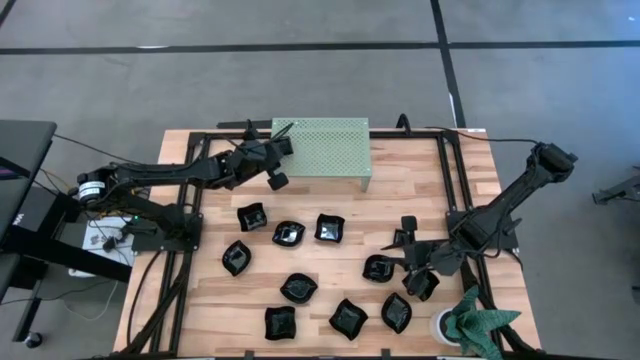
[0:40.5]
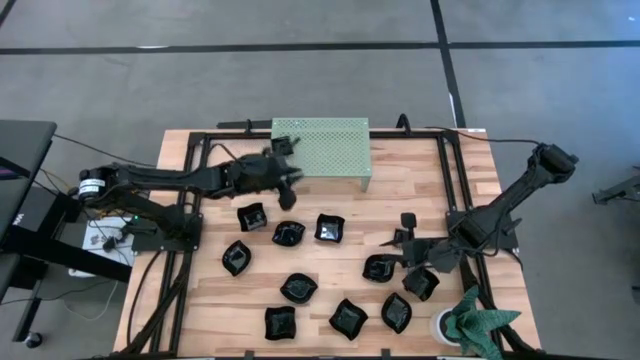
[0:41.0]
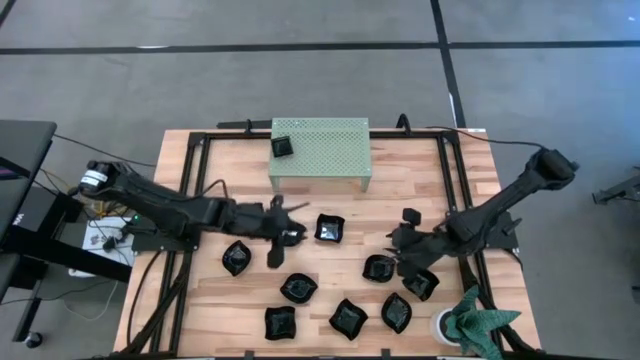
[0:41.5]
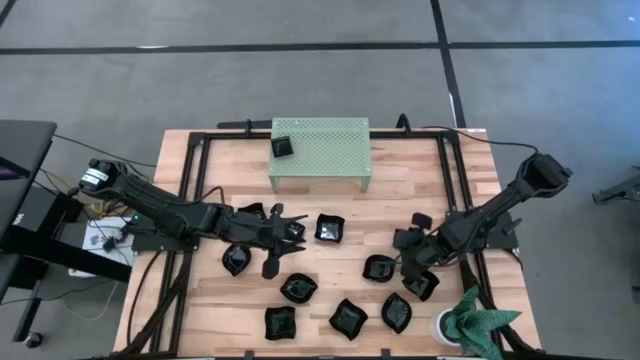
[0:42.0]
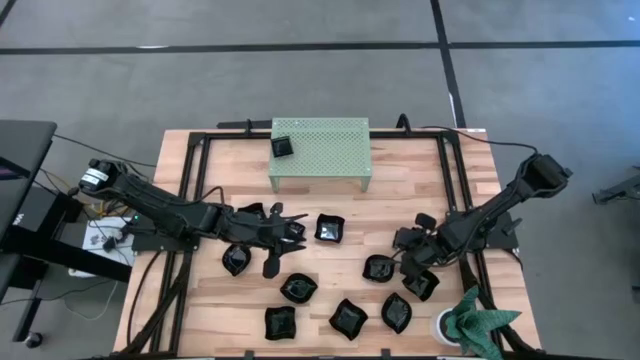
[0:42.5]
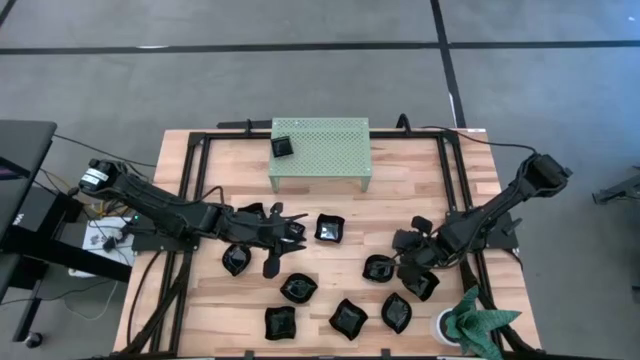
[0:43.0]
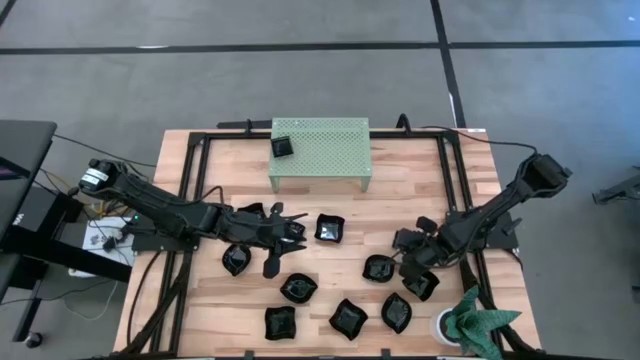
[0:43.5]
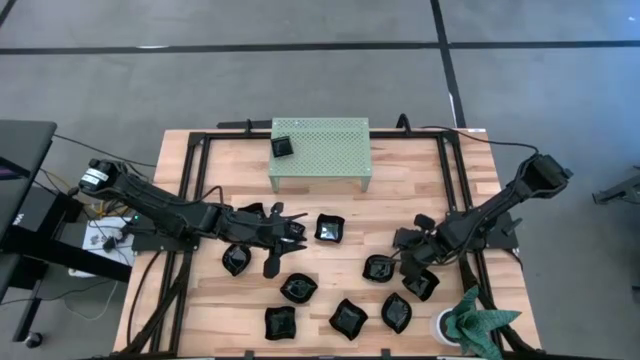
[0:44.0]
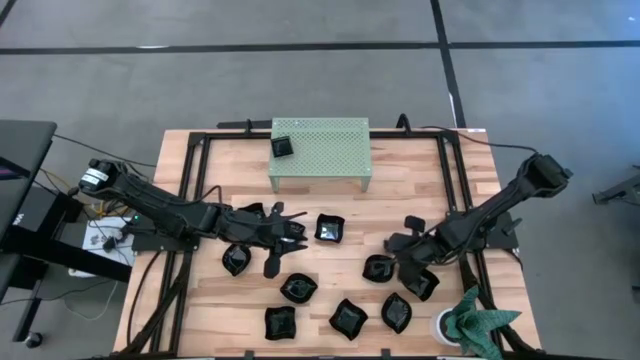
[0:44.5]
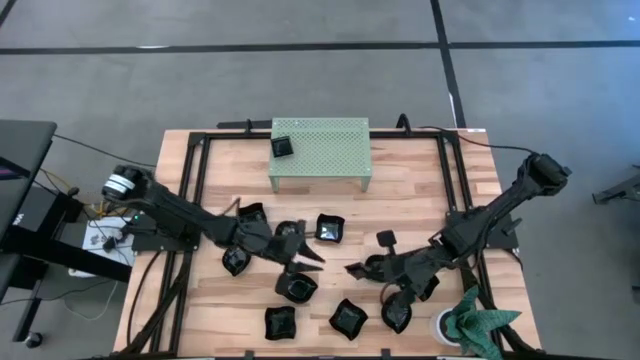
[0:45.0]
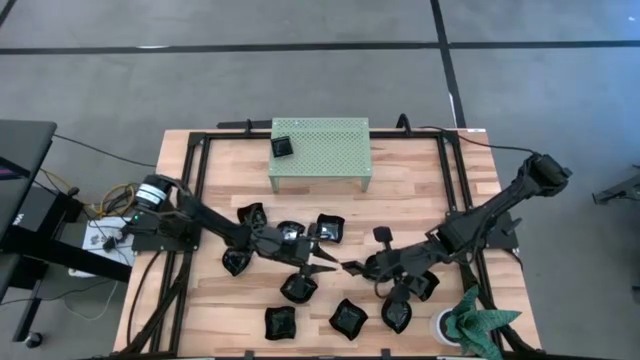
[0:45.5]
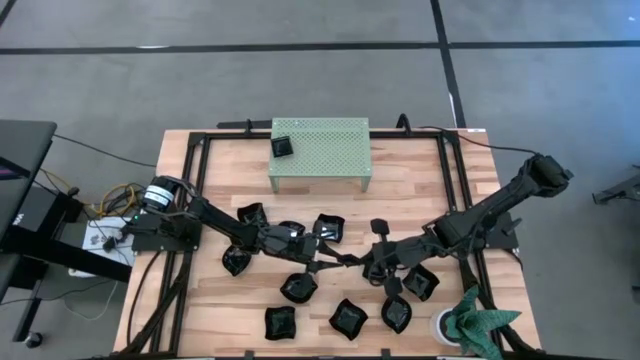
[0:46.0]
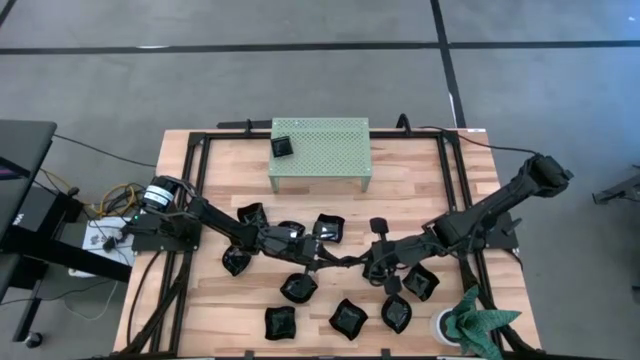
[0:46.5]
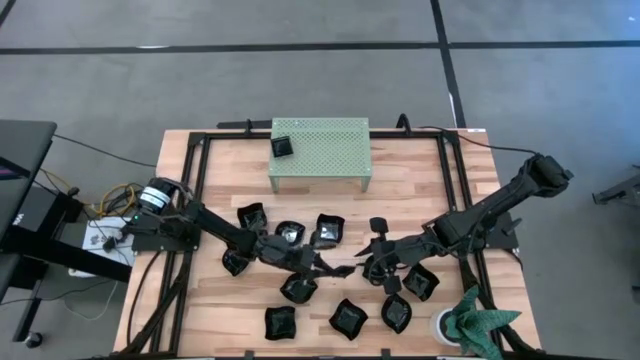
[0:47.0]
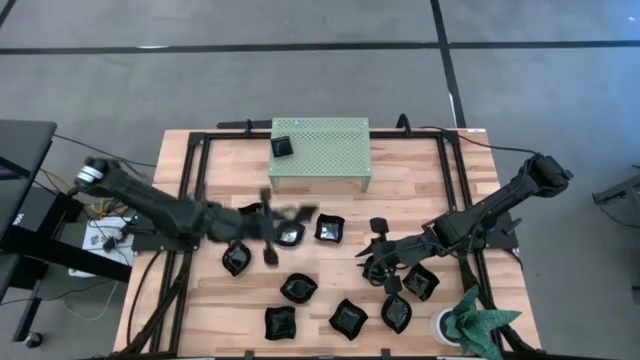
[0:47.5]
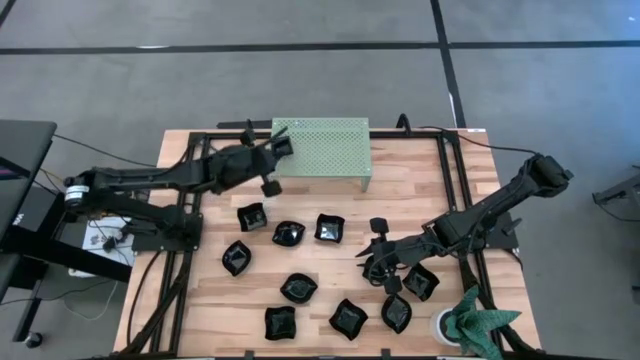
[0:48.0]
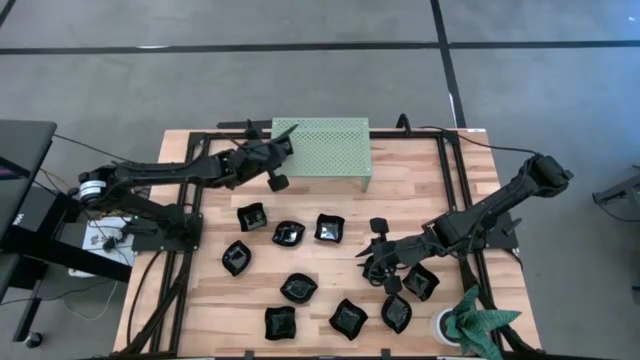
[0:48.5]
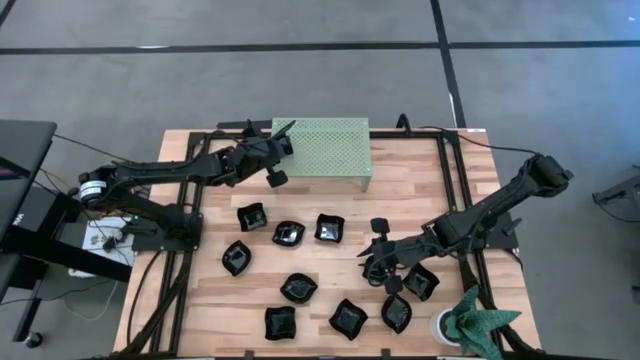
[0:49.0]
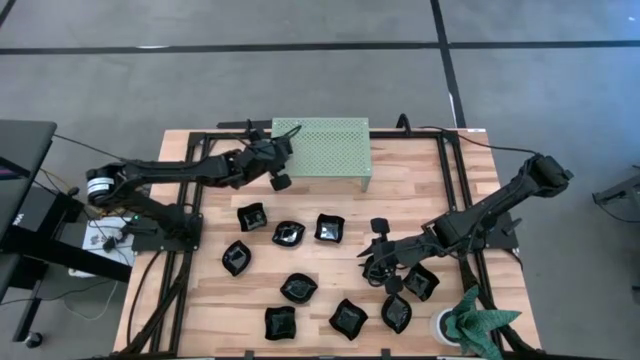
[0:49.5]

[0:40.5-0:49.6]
Task: Pick & Place Mini shaped plates
Stack the black square plate on top of the black square plate on the shelf

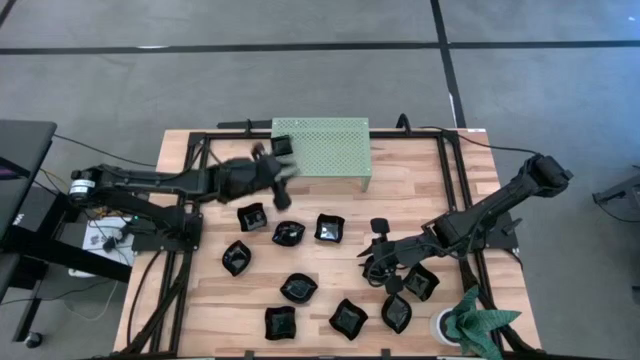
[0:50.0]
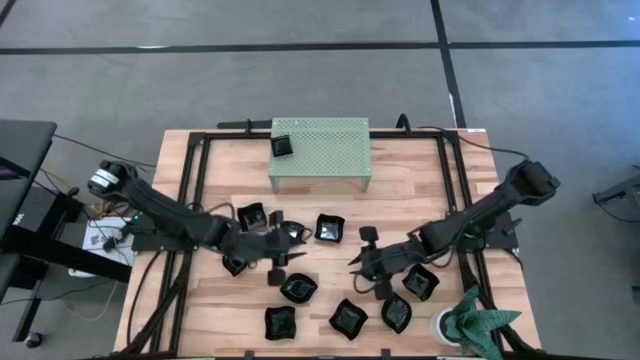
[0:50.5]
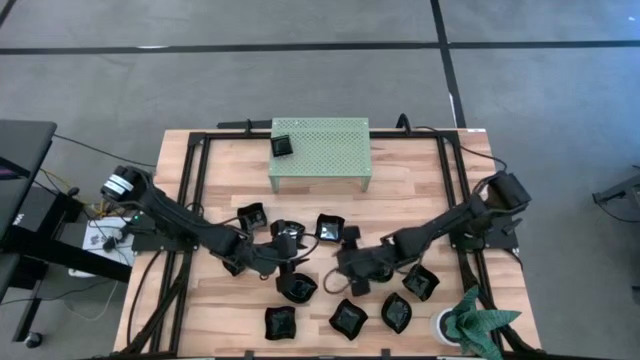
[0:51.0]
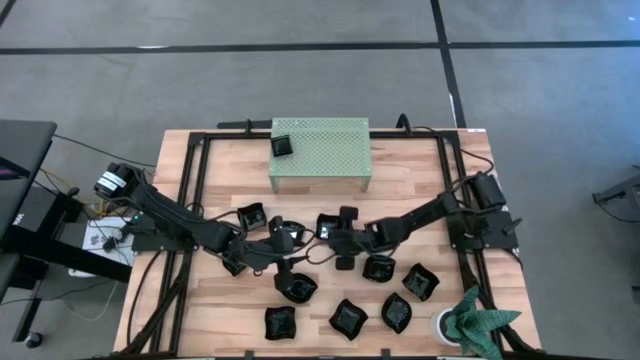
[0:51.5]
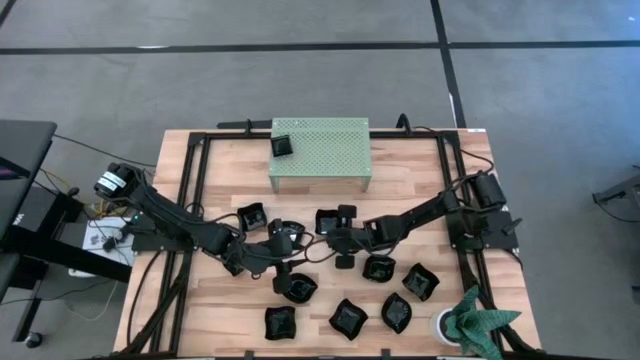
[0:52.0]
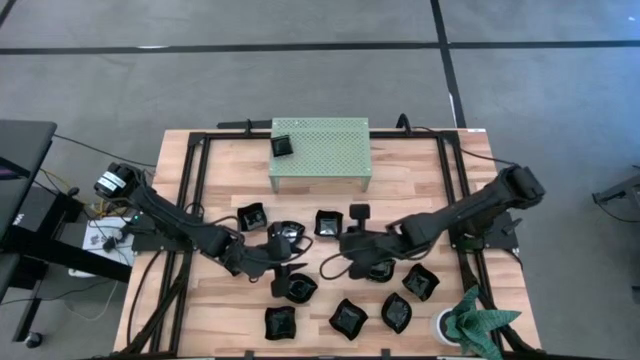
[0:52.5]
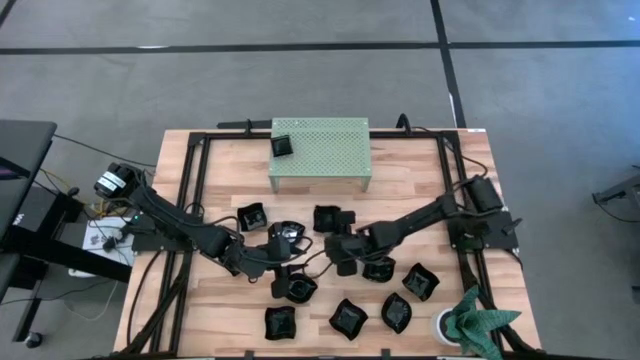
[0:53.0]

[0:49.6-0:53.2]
Put the black distorted square plate on the shelf

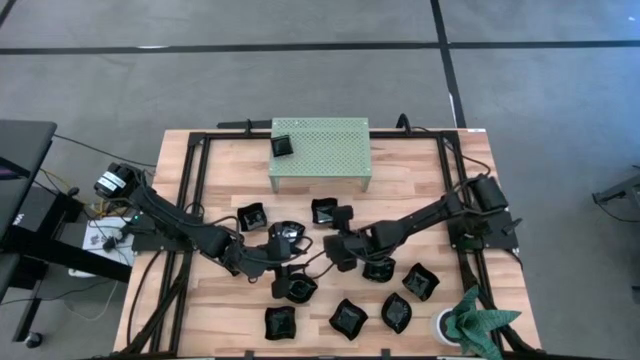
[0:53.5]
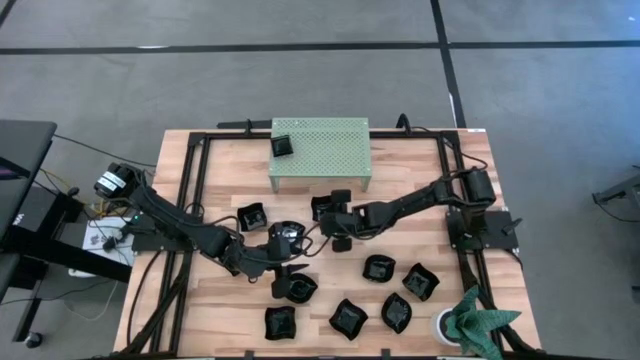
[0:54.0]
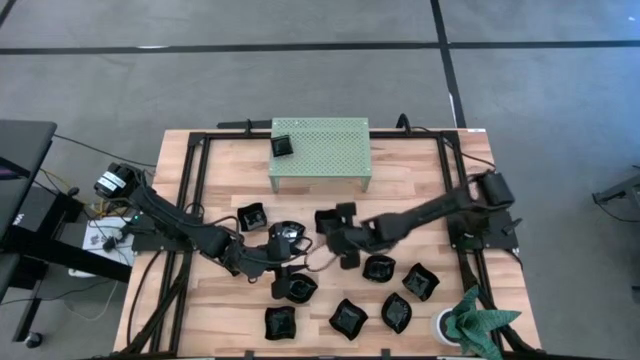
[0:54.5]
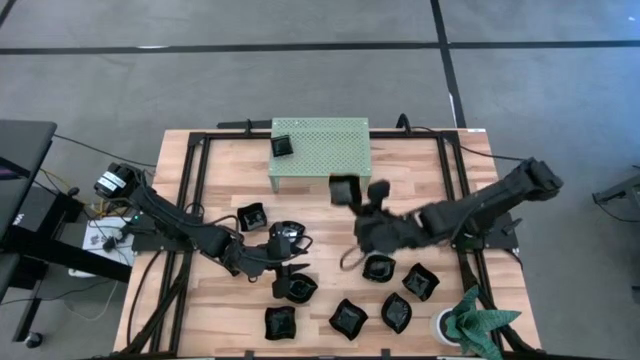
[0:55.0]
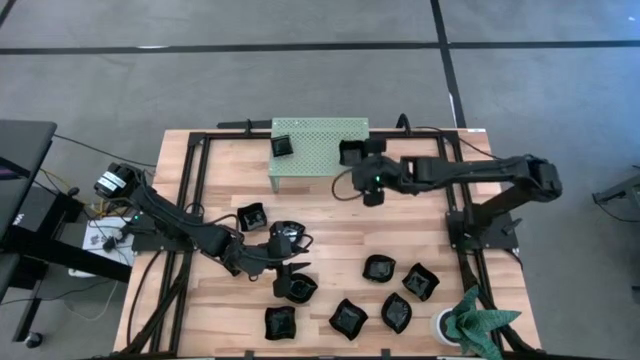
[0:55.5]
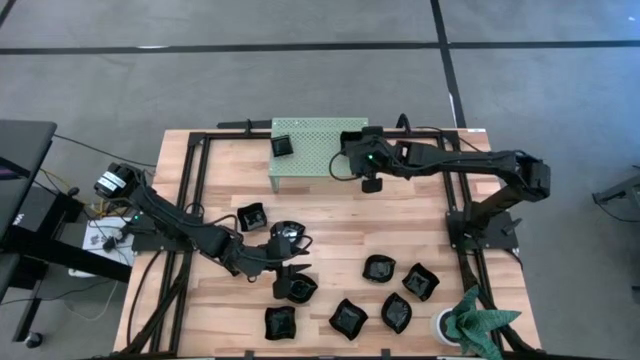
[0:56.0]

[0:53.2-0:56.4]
Put the black distorted square plate on the shelf

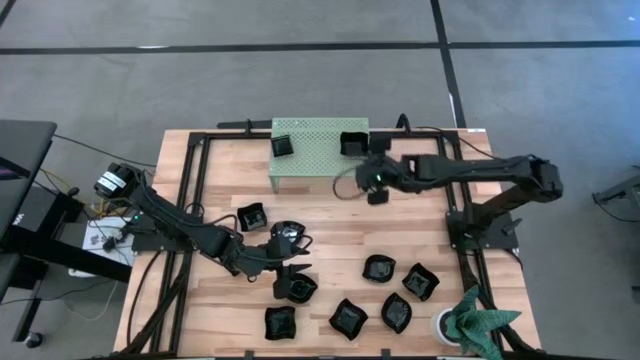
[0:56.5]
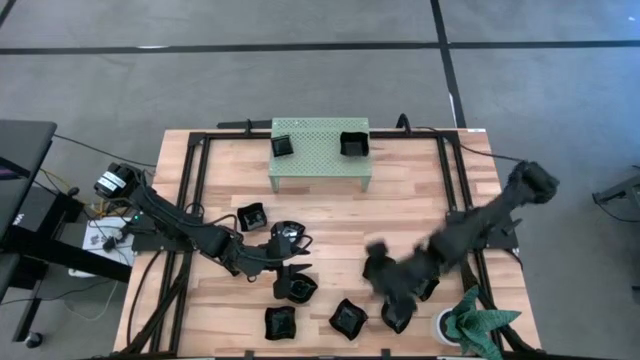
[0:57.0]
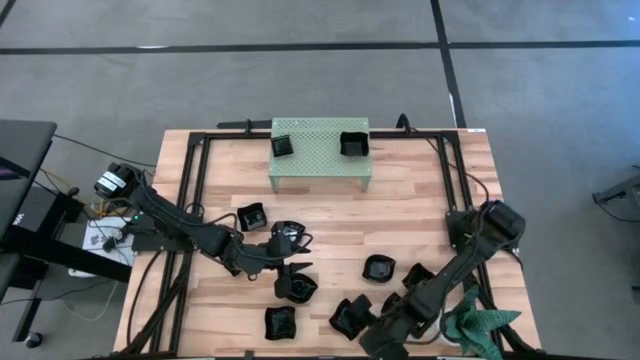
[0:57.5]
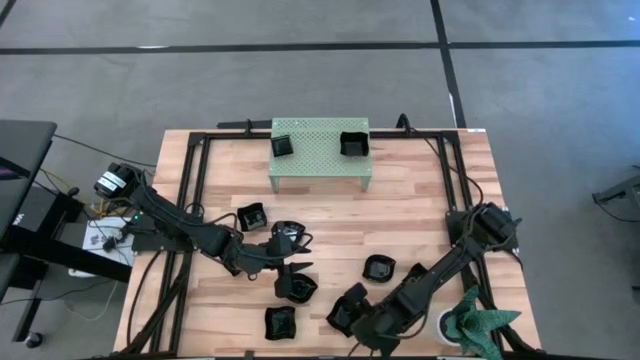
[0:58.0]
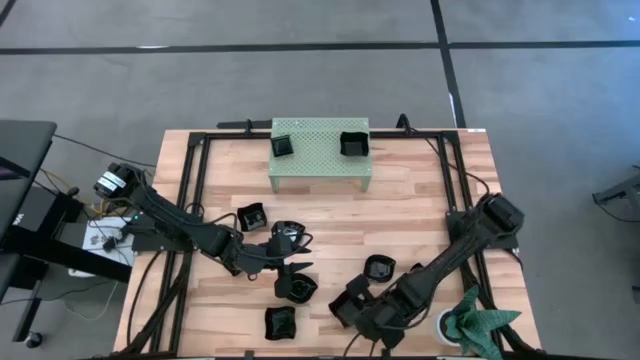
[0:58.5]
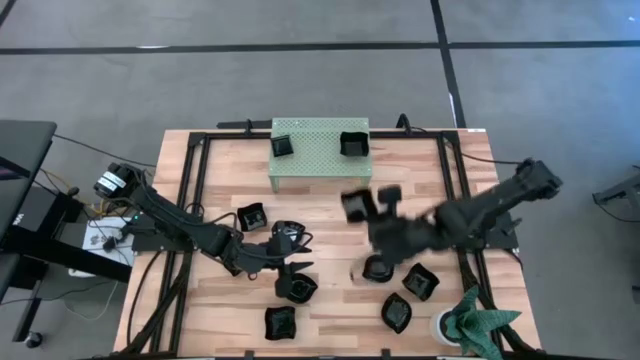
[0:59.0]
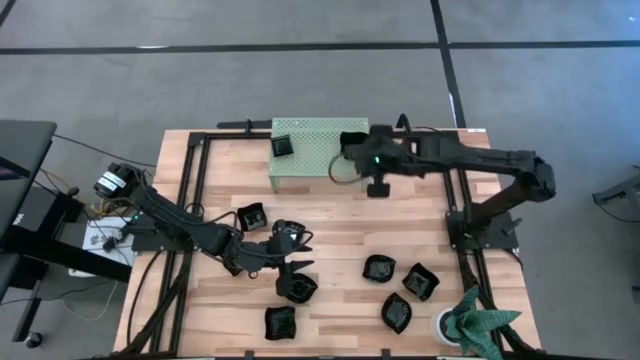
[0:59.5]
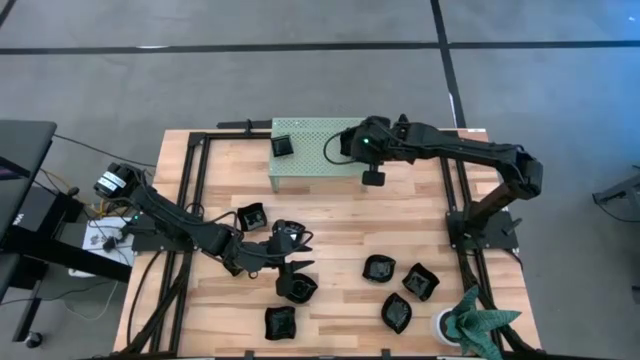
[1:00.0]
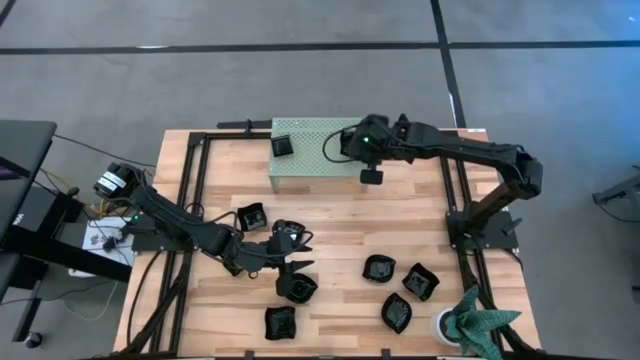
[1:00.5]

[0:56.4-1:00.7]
Stack the black distorted square plate on top of the black distorted square plate on the shelf
